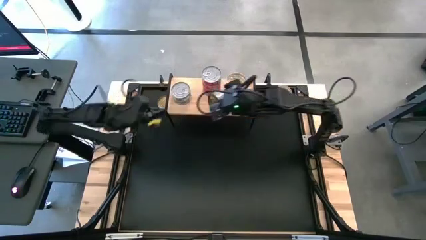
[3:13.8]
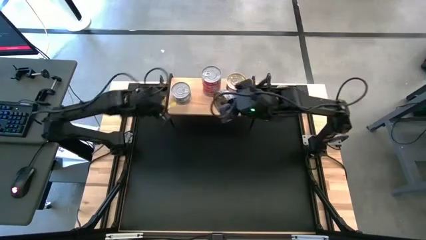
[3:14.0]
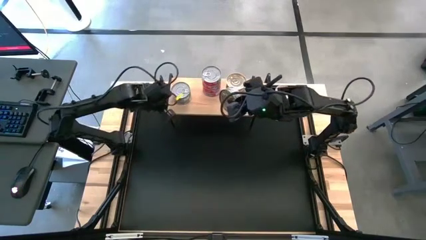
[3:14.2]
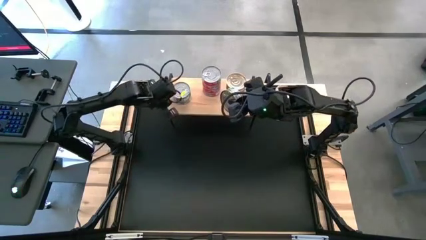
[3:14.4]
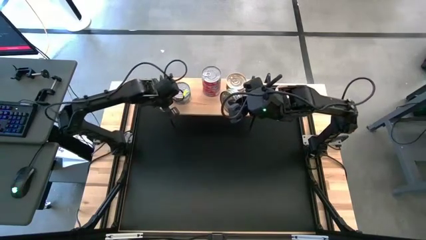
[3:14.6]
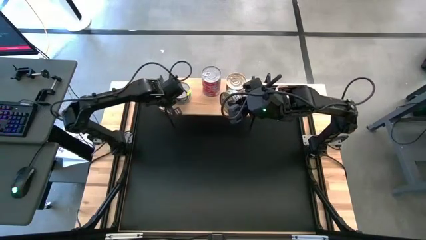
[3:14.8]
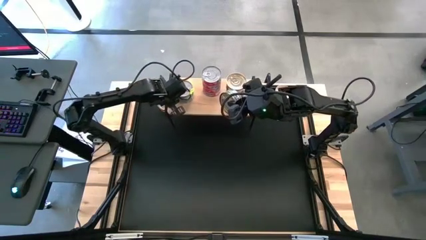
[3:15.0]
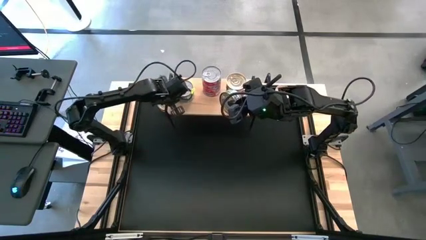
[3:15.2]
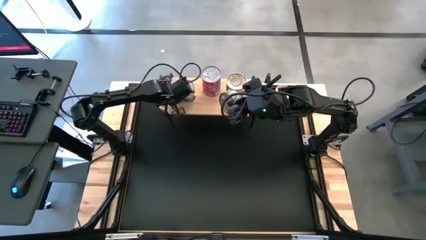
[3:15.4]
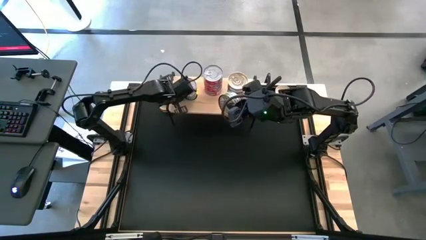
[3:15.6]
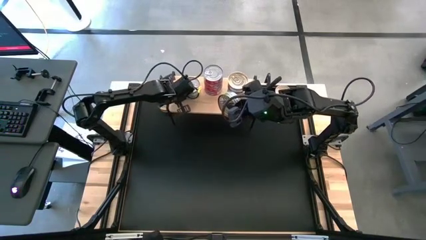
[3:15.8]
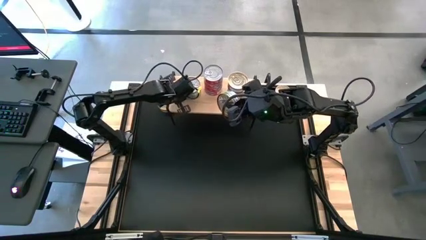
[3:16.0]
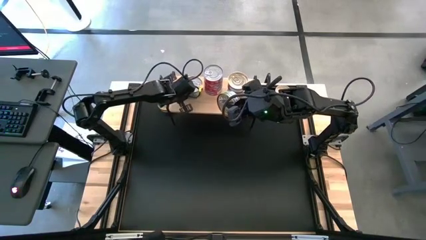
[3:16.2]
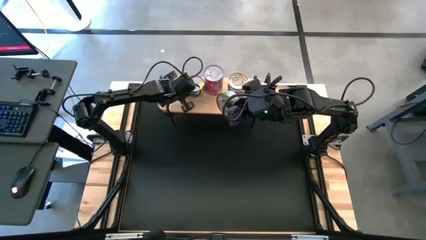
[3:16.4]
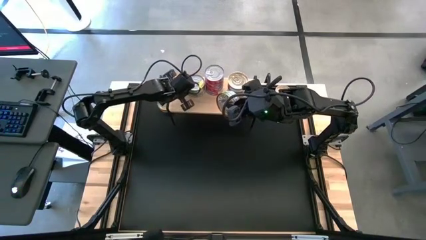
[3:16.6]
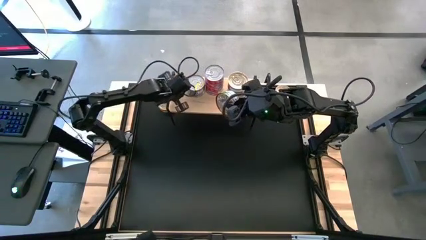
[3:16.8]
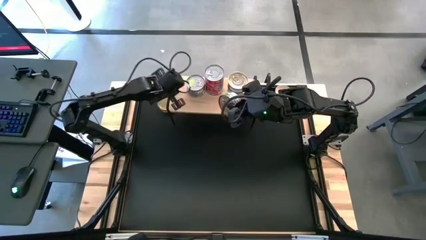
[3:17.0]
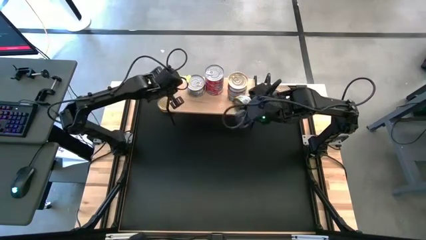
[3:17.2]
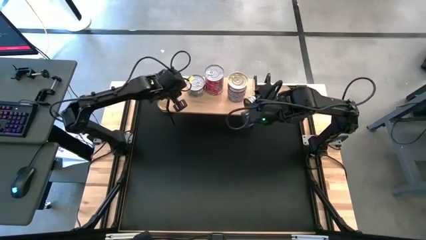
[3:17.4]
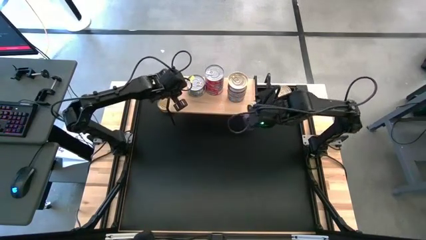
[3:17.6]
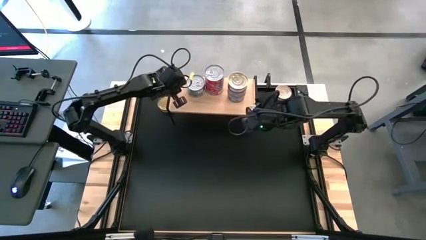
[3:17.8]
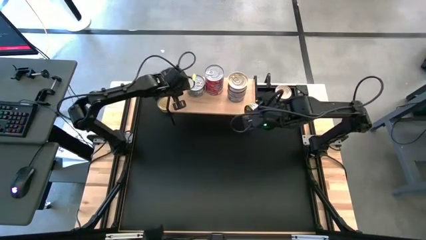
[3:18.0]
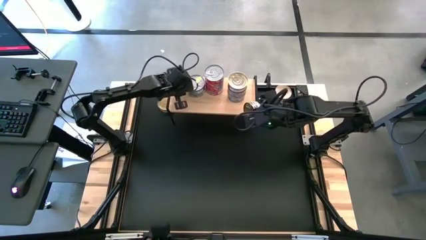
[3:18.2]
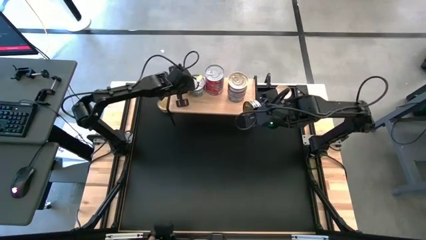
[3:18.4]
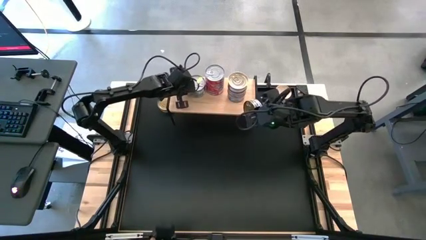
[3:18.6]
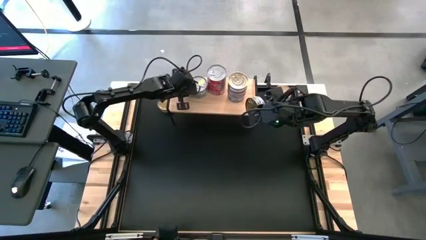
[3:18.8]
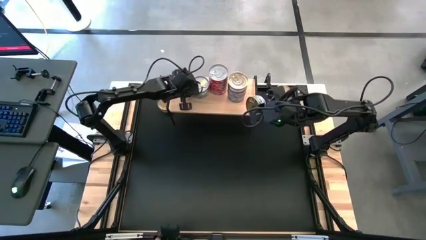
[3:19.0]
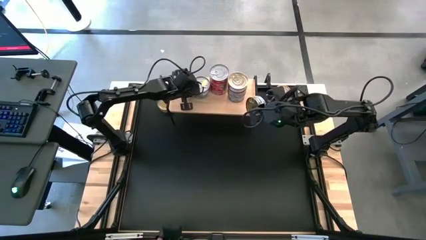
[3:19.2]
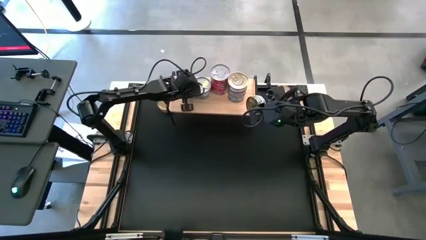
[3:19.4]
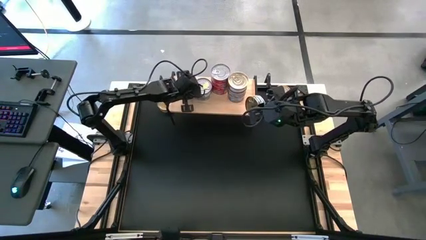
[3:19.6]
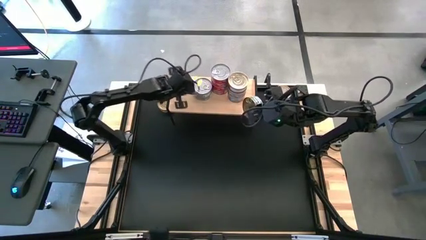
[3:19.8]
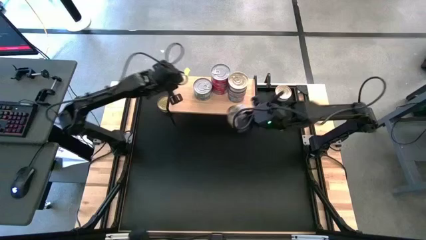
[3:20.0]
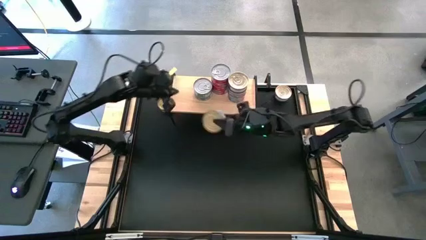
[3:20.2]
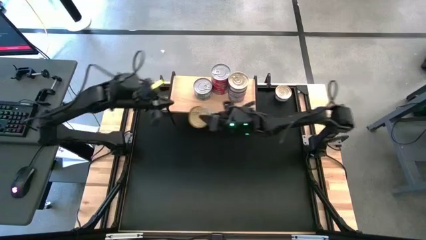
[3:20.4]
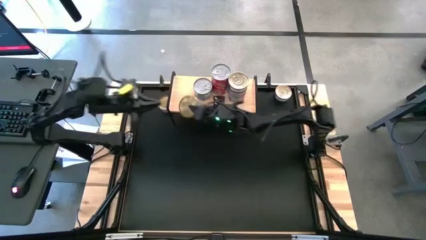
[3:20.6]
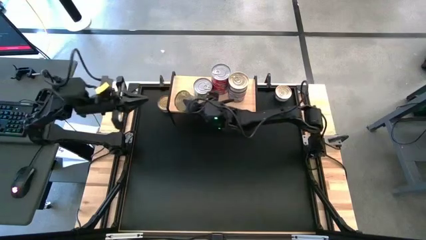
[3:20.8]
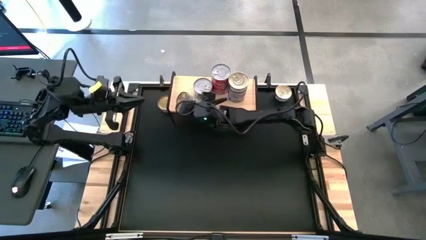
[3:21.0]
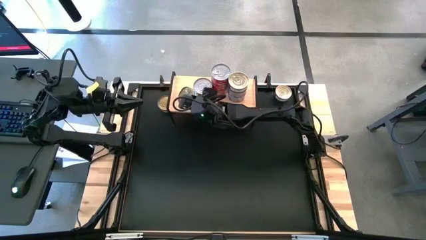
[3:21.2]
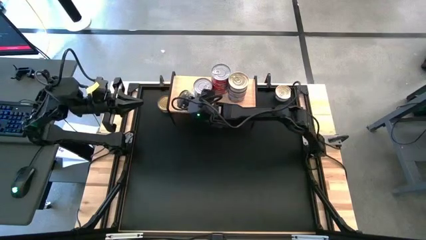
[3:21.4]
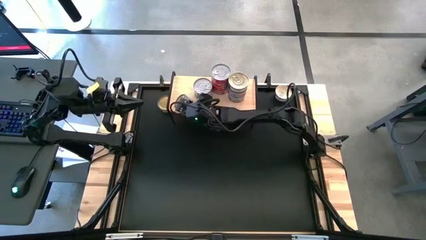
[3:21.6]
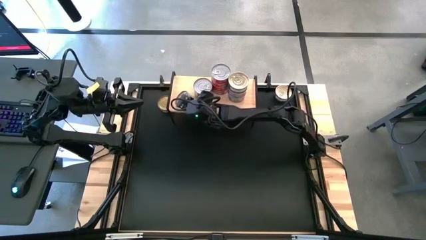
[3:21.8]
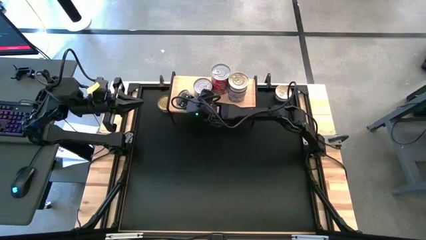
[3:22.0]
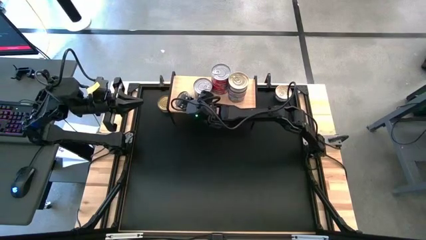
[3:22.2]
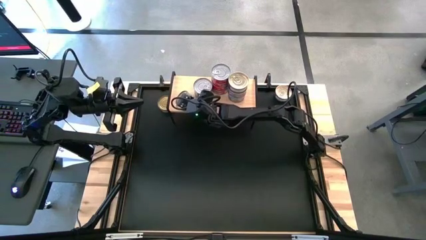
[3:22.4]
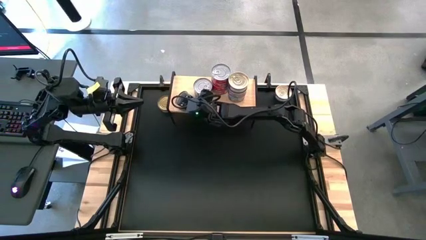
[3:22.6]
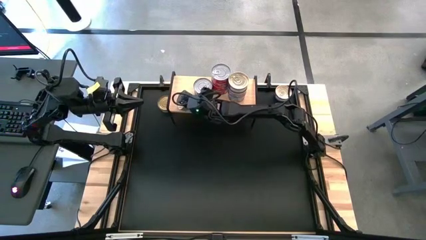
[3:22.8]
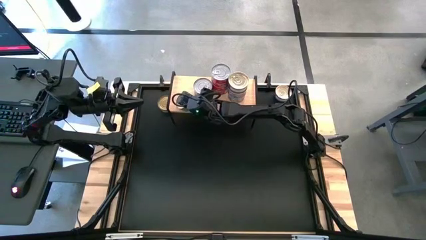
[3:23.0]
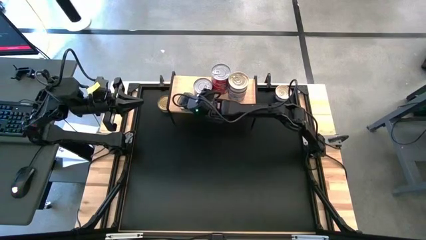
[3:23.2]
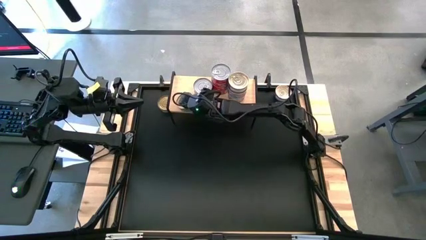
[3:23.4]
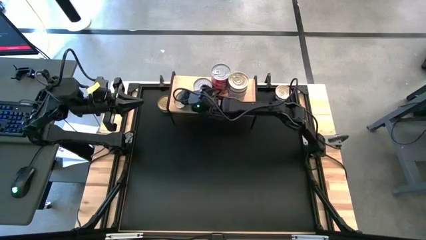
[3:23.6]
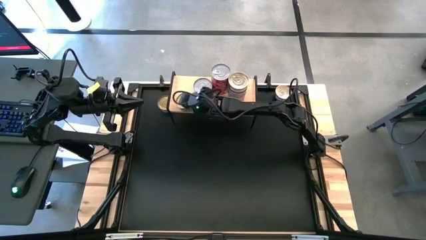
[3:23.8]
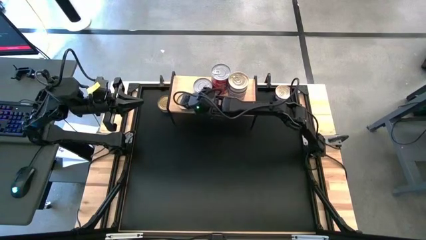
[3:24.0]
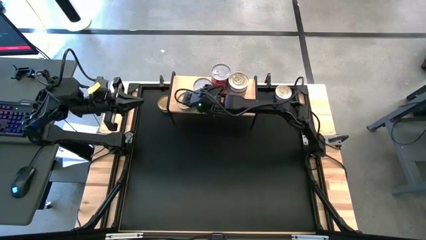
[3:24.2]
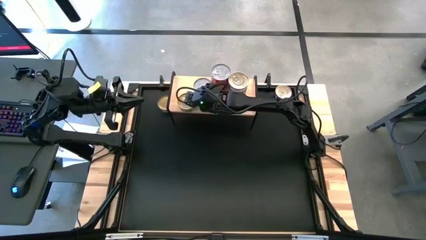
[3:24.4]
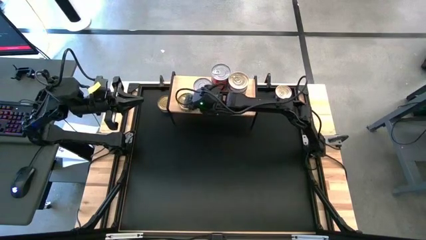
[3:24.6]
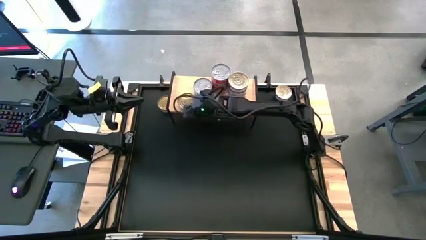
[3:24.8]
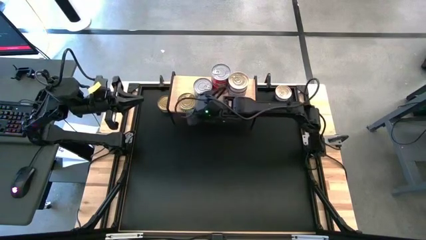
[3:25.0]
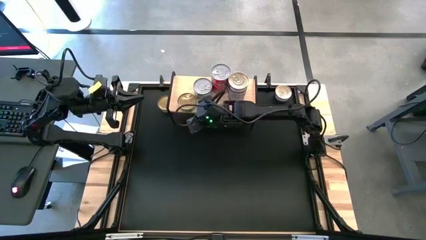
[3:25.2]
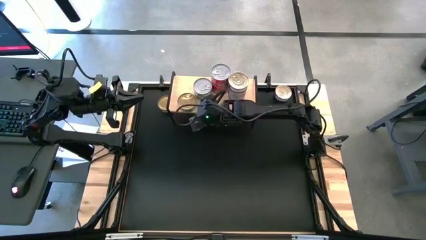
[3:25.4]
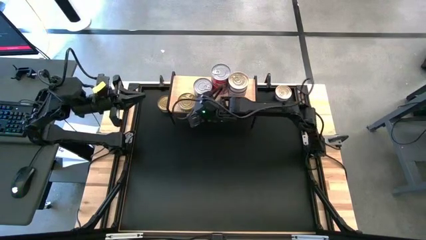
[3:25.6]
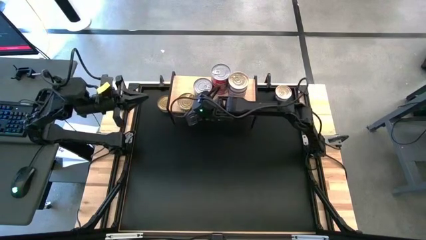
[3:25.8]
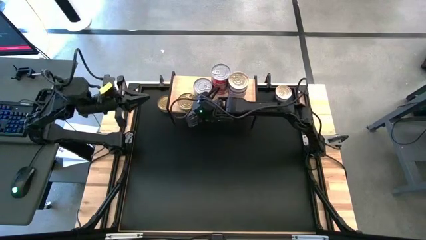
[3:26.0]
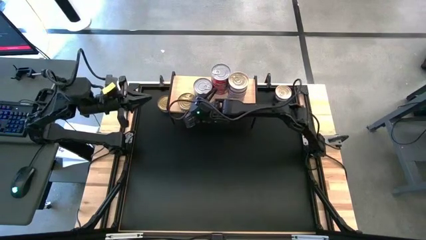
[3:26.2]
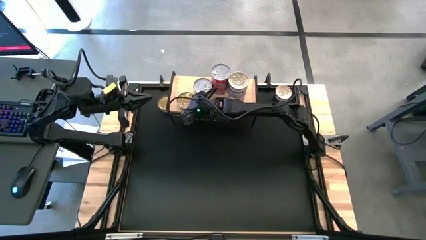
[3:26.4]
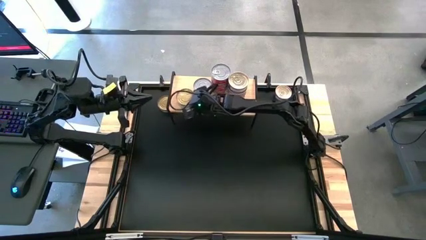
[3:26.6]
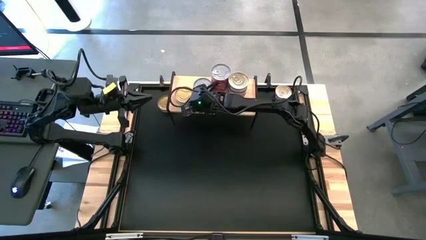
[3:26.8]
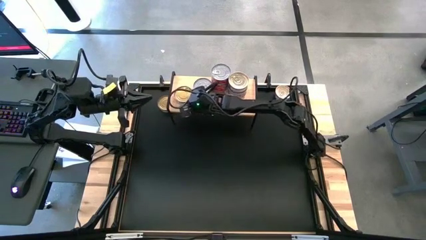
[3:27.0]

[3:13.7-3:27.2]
Task: Stack canned seafood by type on shelf
Put the green tuna can on the shelf

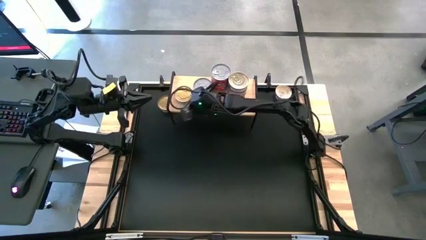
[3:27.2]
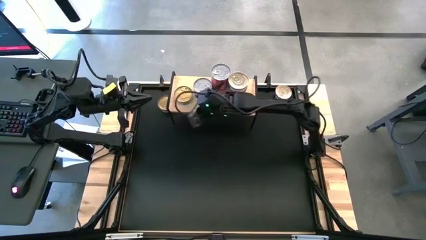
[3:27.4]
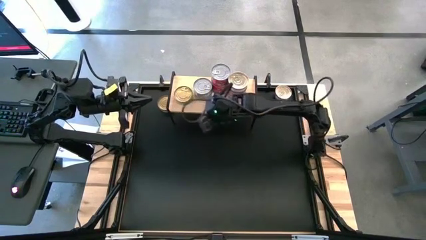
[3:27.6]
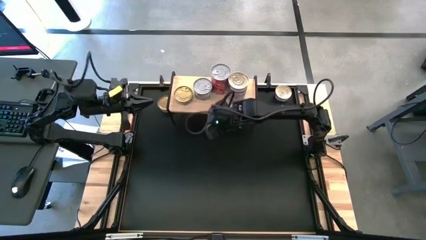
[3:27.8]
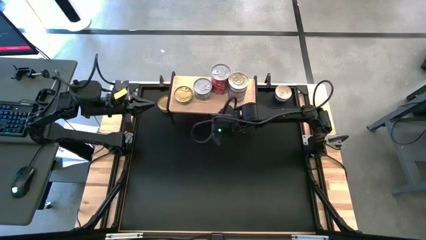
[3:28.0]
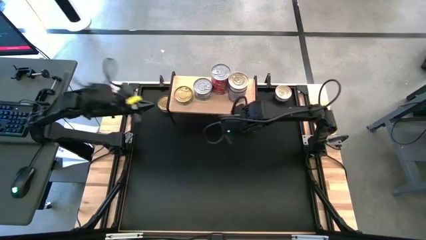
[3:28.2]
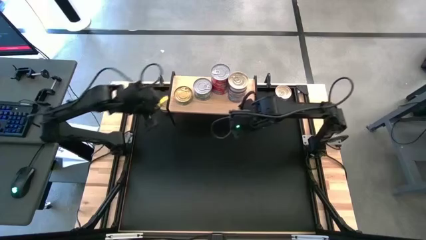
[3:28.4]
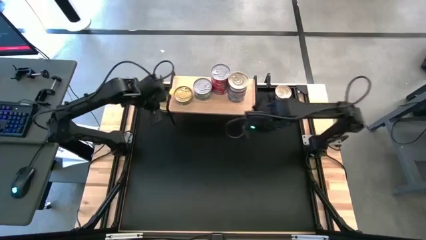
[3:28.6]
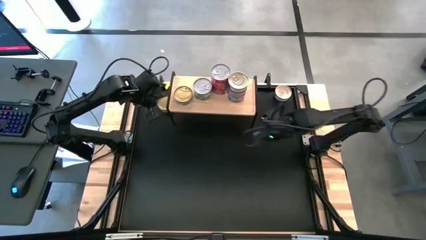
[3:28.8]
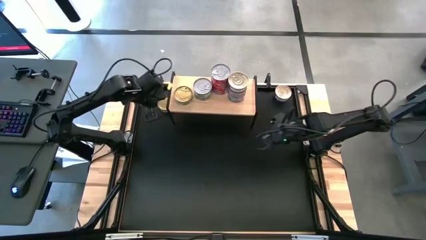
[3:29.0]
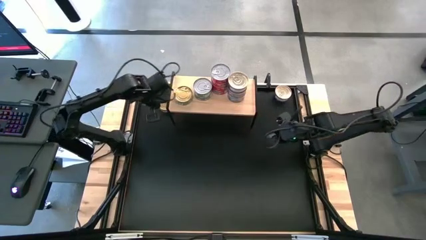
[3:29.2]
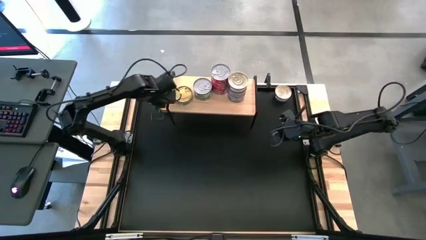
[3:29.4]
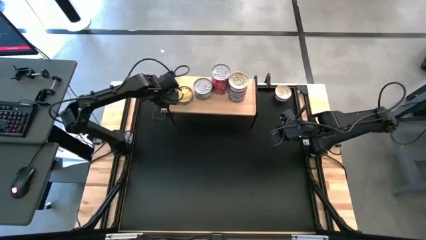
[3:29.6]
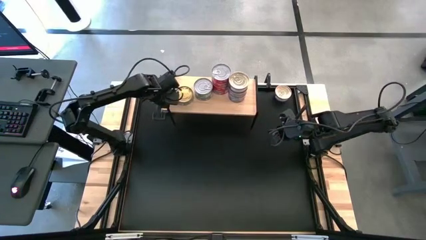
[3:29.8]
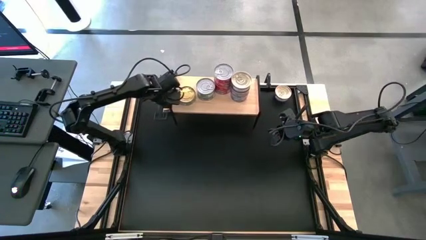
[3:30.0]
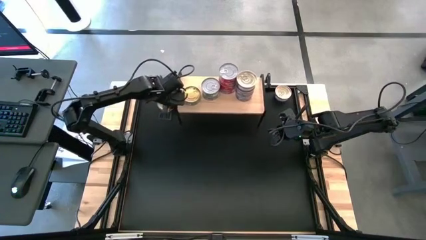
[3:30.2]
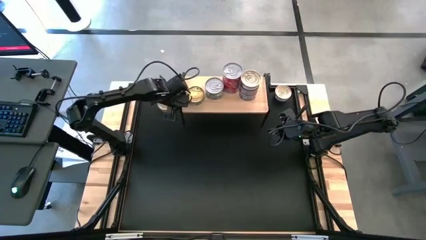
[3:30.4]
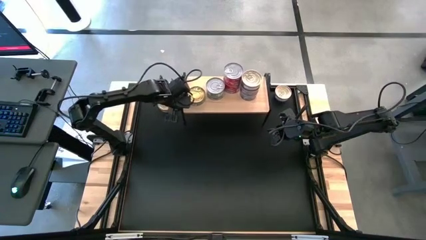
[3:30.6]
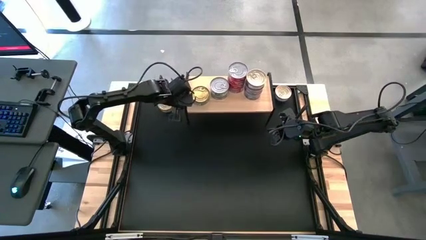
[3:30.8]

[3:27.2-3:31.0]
Adjust the shelf
